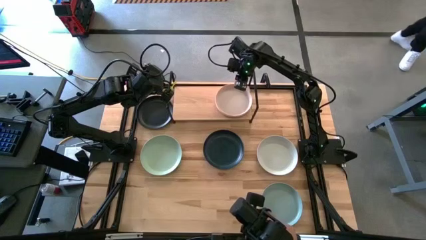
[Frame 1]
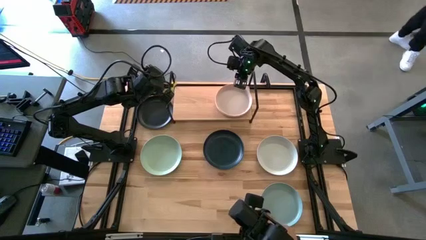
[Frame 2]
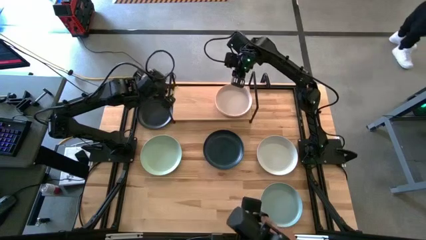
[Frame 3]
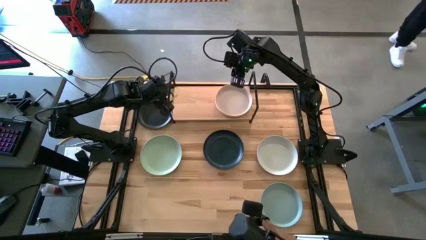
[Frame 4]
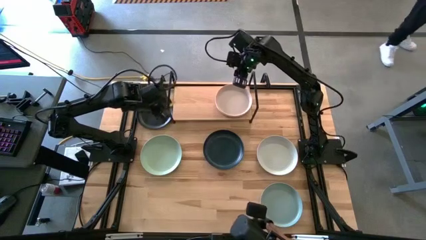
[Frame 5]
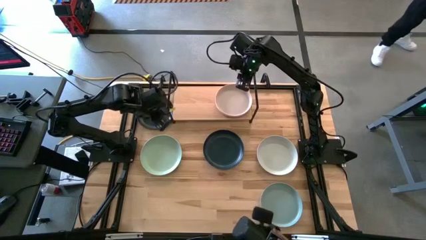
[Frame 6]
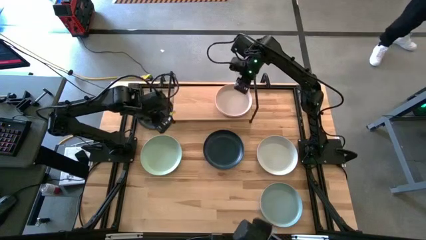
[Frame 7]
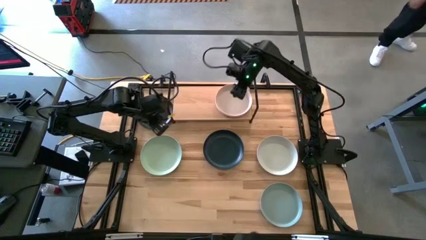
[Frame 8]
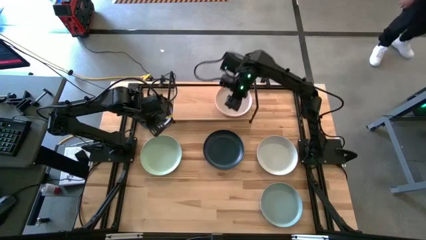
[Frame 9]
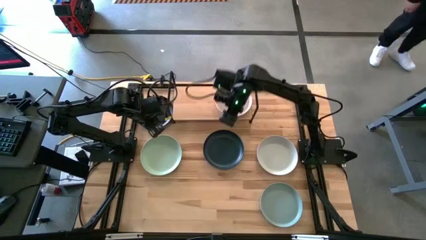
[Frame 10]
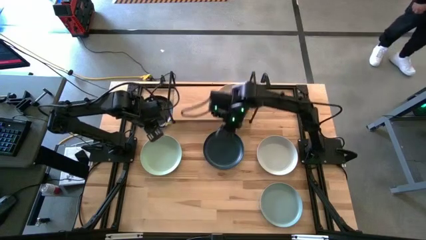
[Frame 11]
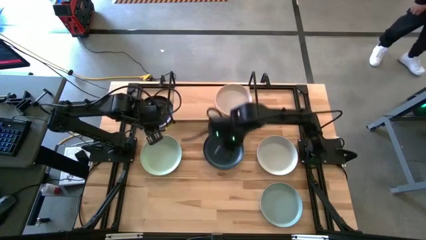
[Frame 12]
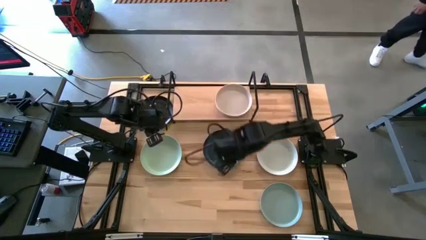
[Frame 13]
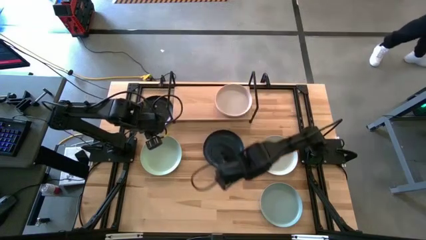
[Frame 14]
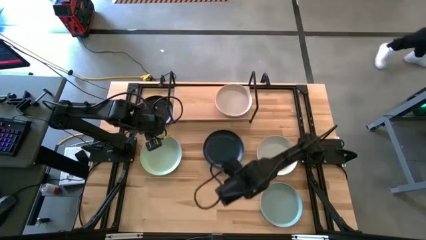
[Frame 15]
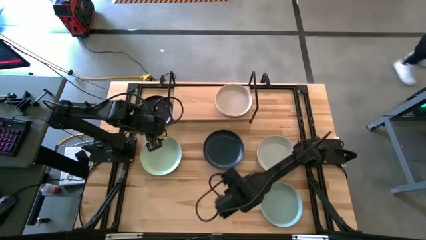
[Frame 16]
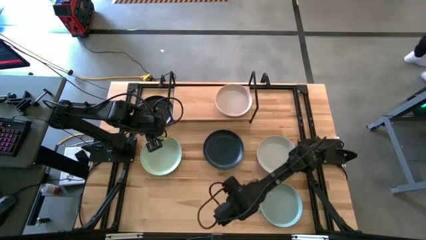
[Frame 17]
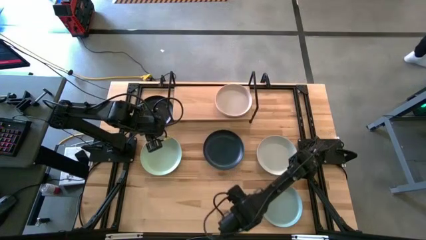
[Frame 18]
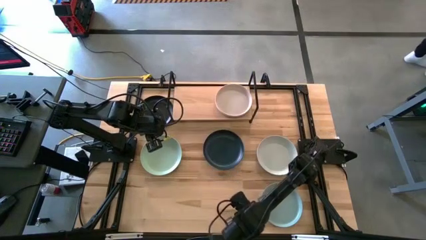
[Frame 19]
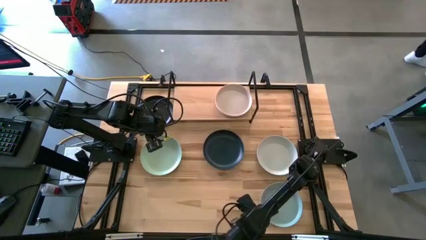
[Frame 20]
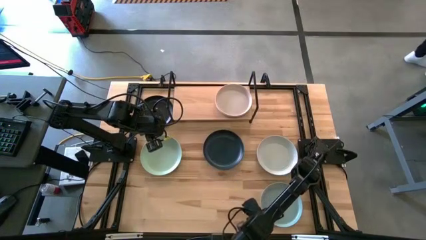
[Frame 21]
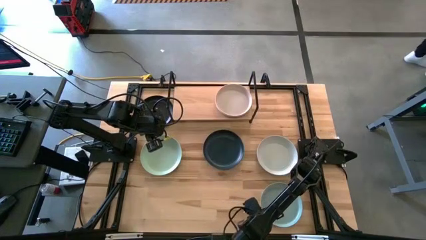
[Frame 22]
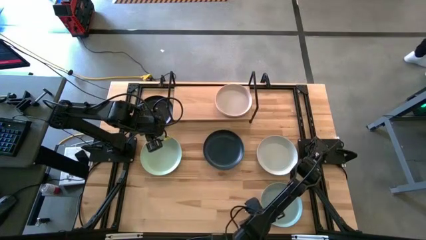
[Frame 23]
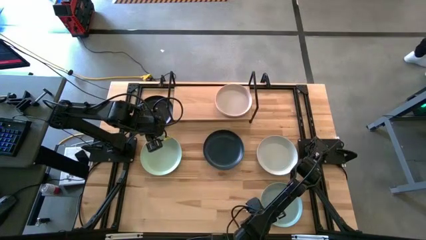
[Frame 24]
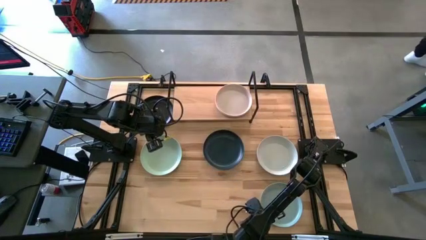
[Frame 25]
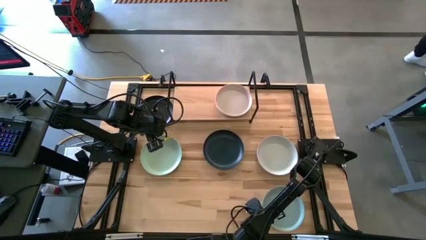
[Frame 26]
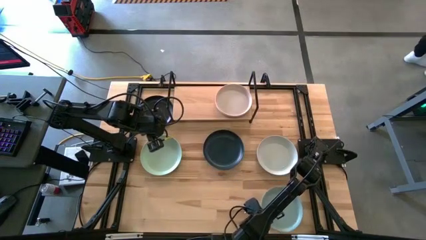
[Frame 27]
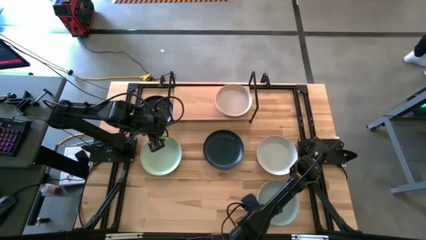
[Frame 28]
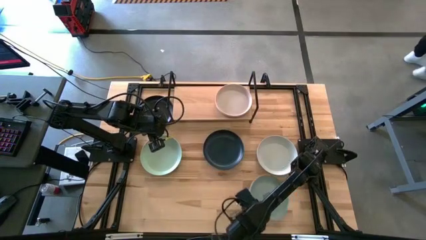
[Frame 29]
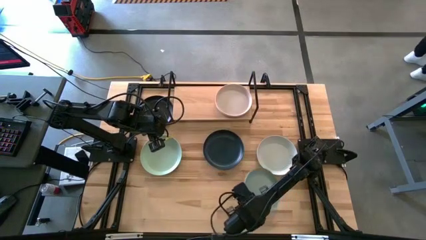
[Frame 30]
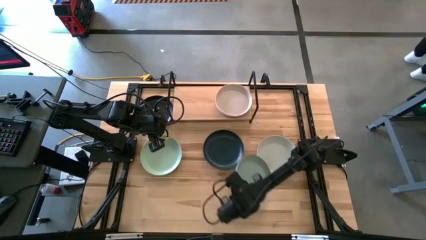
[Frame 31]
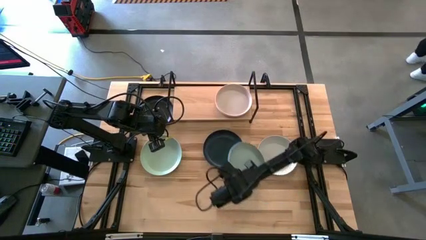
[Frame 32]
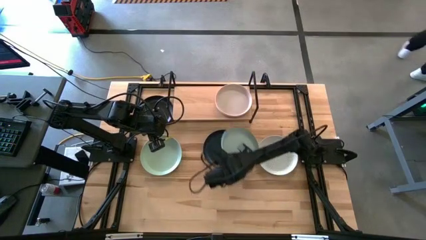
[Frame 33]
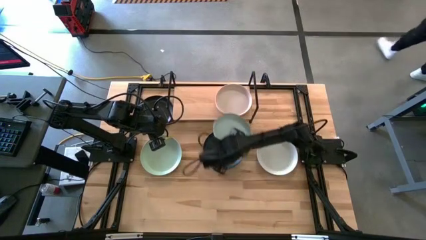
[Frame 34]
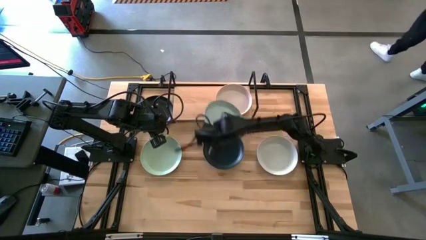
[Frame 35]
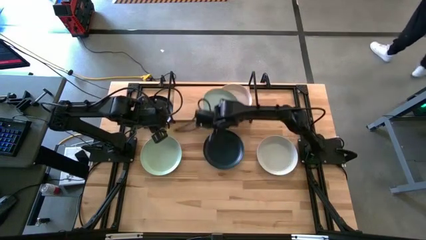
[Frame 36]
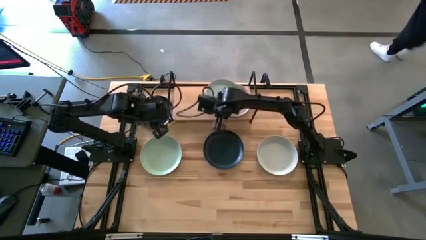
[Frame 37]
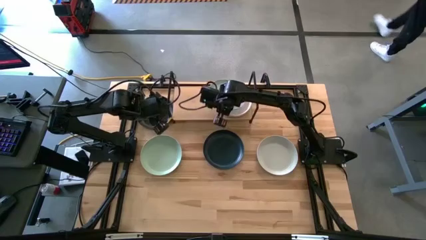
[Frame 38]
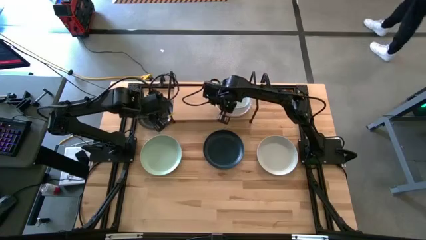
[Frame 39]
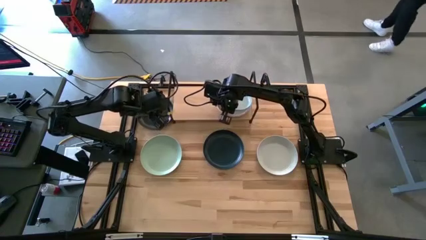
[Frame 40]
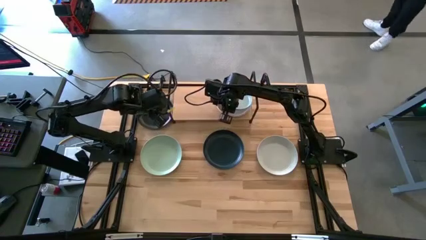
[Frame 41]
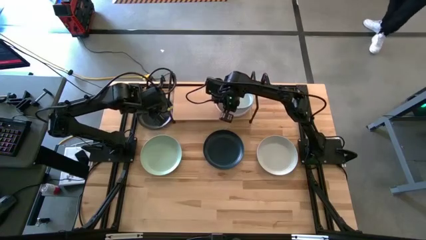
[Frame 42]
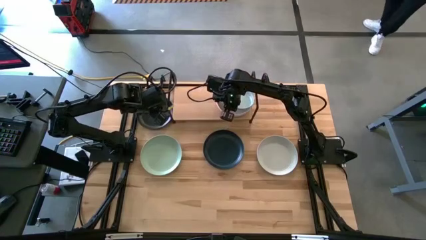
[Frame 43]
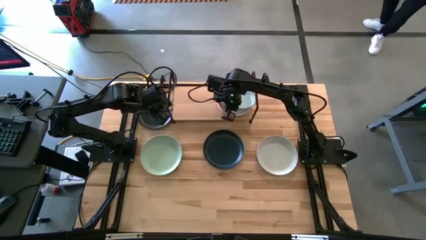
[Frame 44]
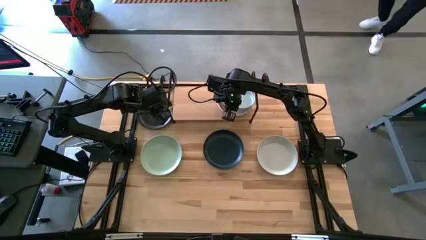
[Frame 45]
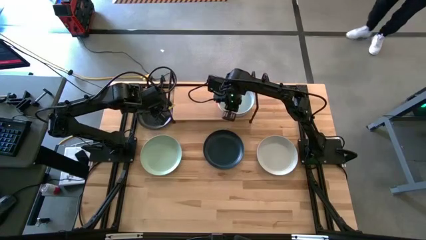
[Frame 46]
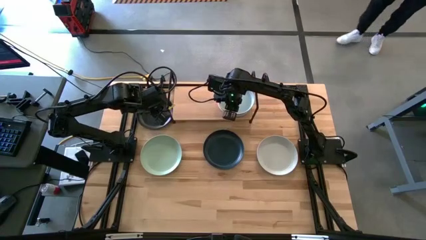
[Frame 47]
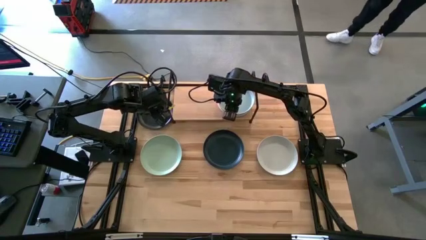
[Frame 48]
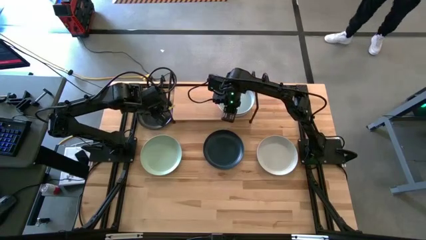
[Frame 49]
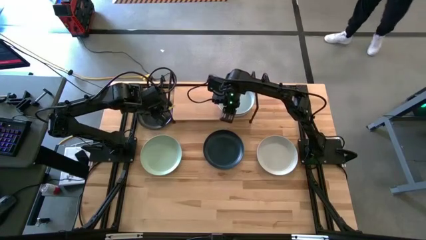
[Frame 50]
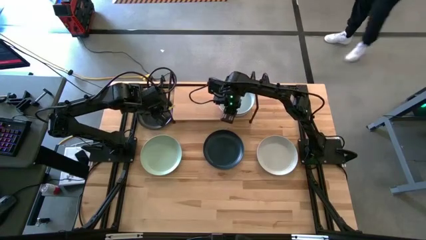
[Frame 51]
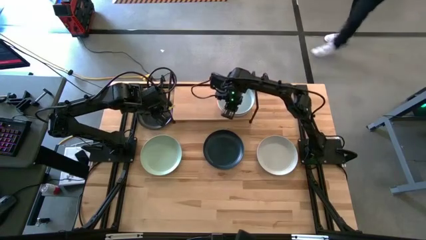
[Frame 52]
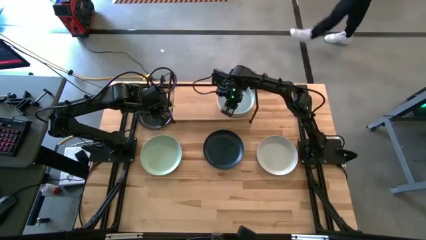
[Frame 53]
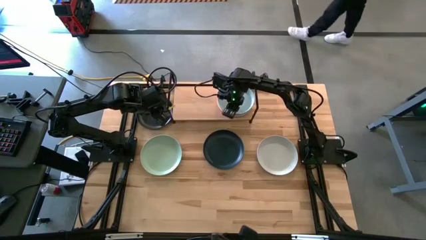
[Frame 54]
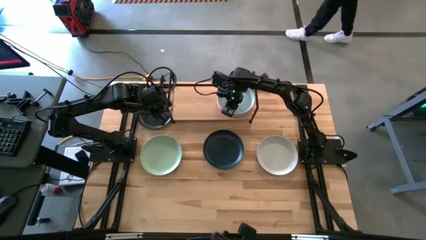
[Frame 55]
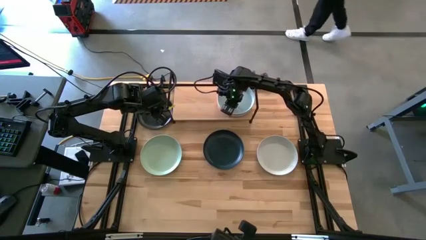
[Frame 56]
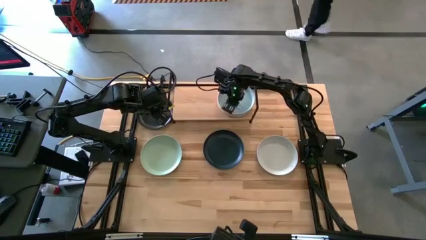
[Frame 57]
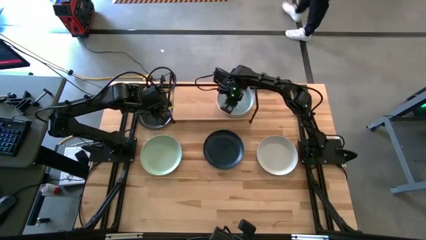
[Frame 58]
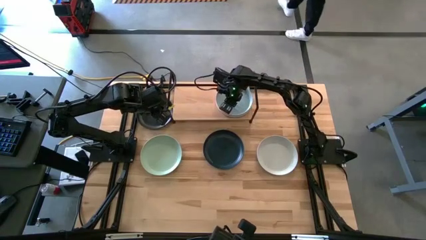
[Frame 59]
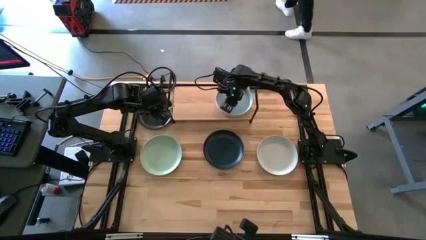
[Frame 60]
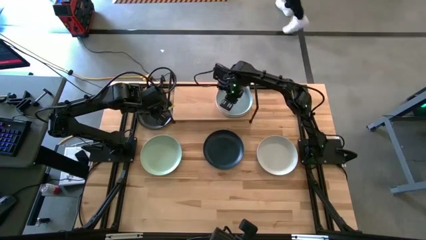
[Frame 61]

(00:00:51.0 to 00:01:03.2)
Task: Place and stack plates onto a shelf
Stack the blue plate on top of the gray plate on the shelf

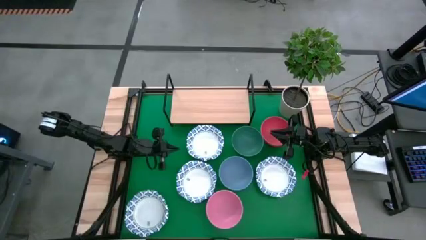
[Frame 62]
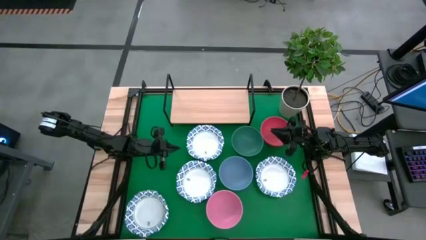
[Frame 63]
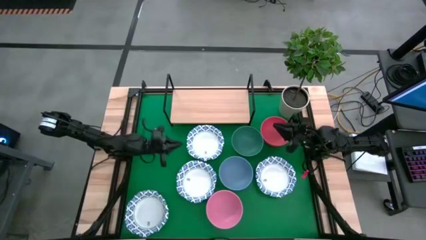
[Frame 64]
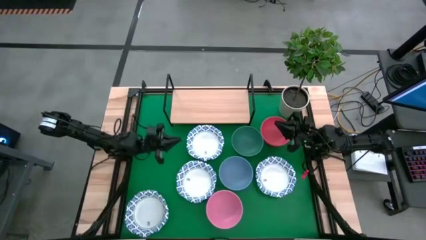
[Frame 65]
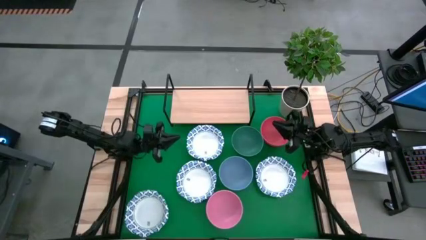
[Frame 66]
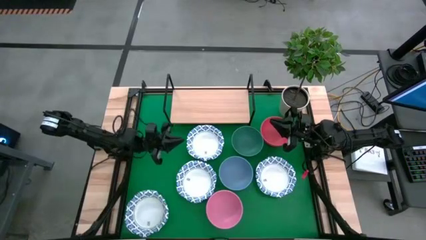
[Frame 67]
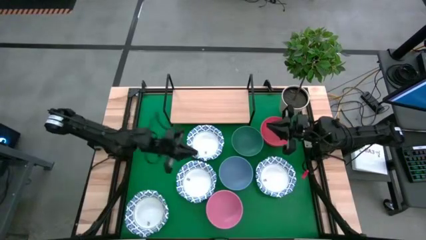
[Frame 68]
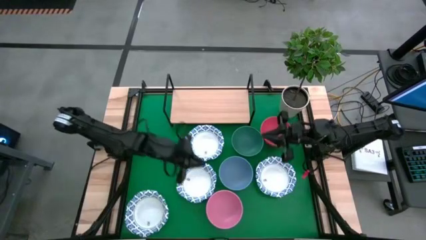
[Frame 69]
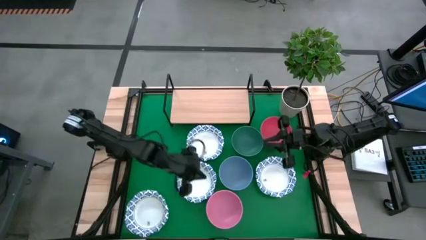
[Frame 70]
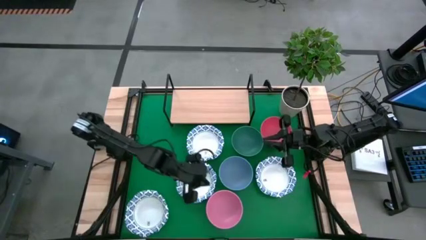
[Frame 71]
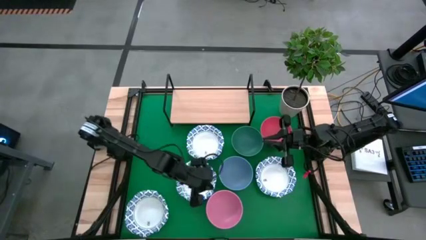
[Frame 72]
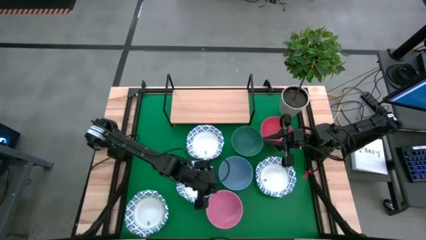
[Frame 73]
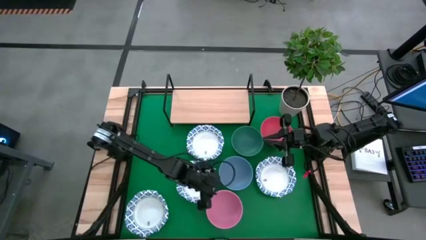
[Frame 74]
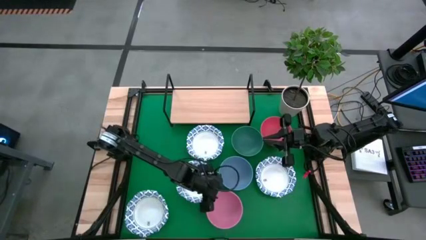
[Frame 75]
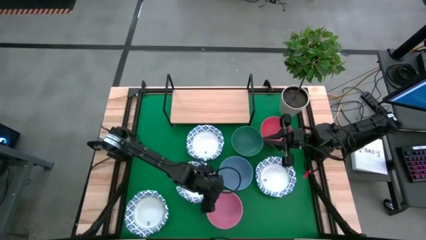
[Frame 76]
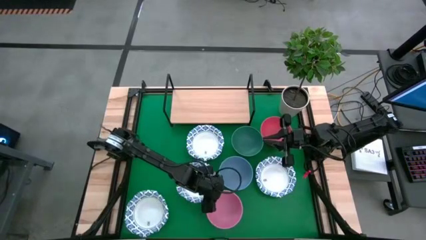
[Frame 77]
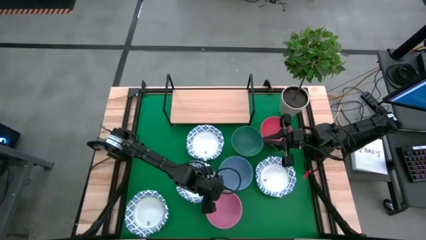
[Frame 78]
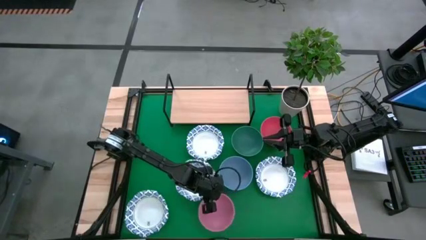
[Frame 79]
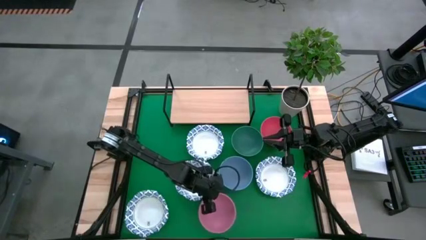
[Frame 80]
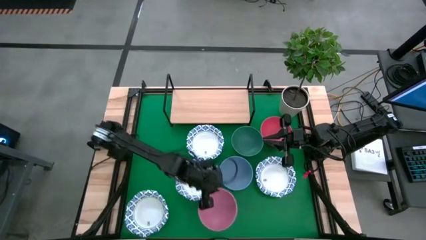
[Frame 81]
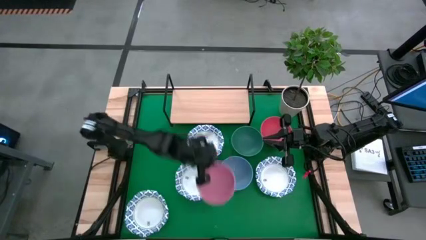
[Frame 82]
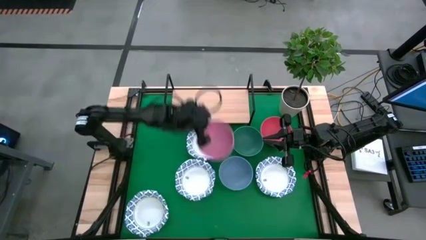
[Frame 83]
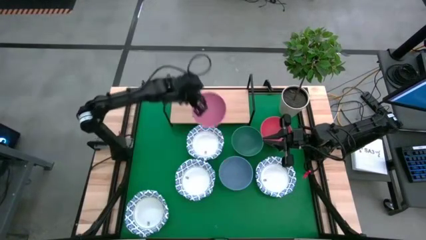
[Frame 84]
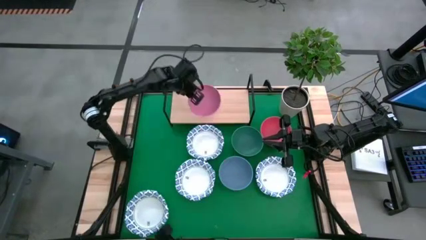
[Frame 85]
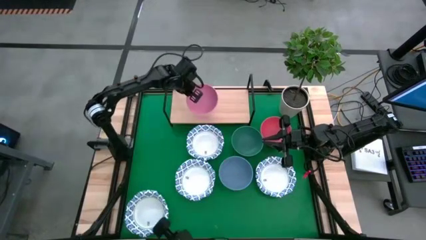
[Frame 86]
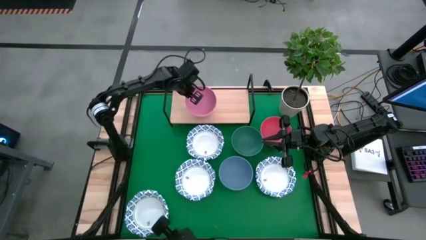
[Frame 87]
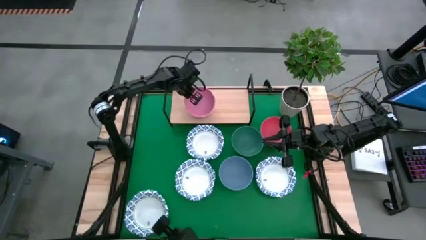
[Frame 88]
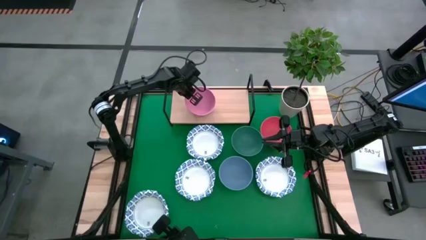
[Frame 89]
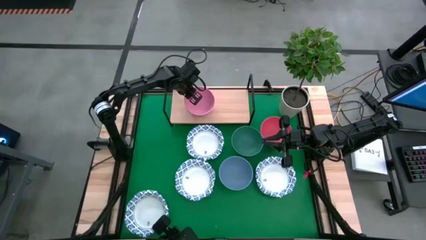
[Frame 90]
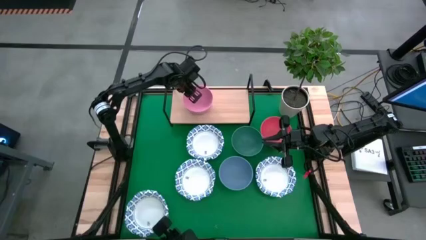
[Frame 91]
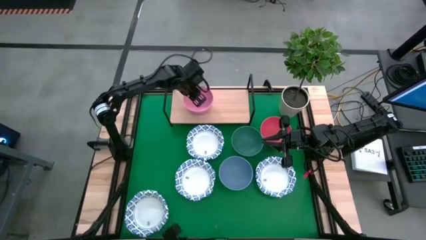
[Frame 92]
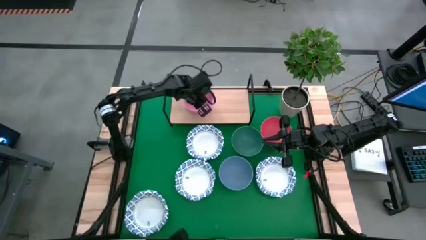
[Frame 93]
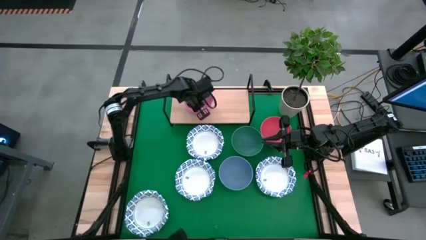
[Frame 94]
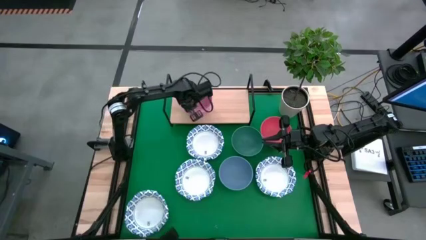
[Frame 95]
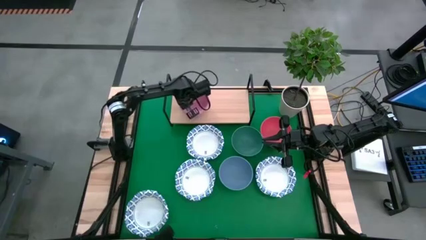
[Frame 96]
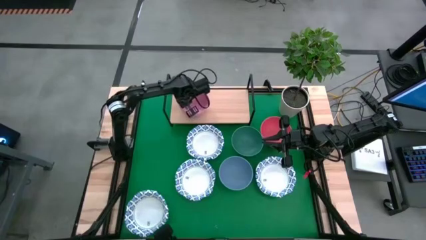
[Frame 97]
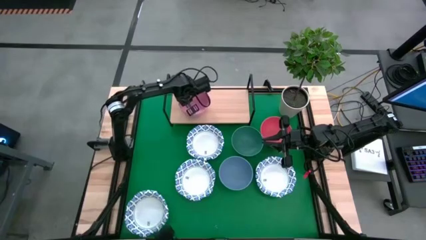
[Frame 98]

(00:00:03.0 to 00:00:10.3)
Task: Place and stack bowls onto a shelf
Put the pink bowl on the shelf
